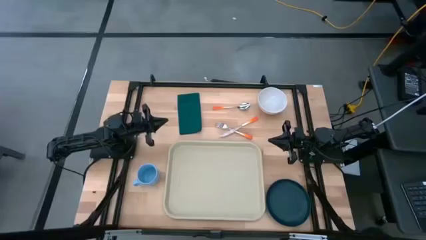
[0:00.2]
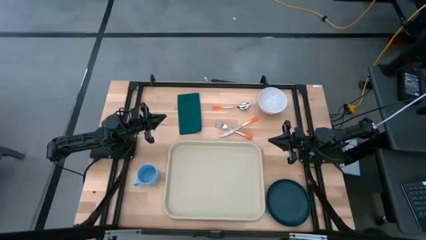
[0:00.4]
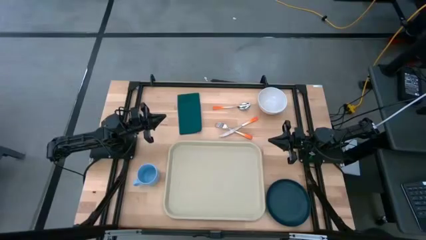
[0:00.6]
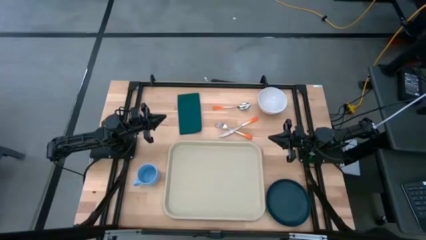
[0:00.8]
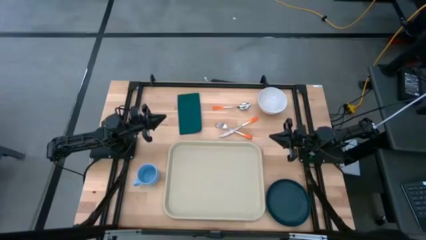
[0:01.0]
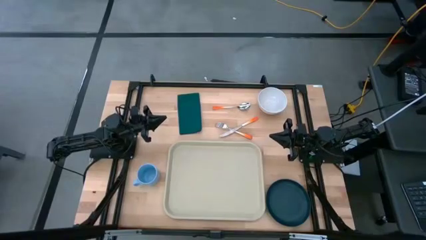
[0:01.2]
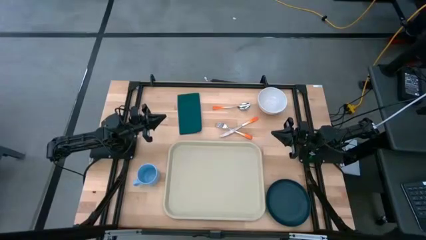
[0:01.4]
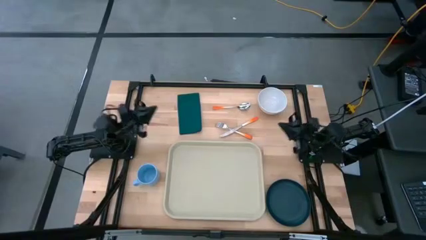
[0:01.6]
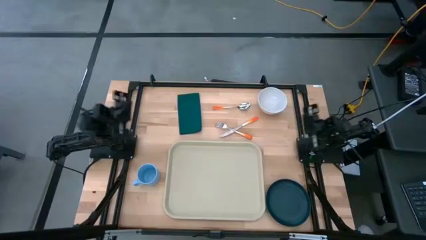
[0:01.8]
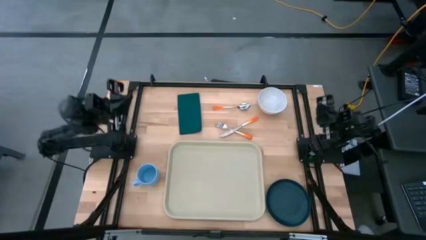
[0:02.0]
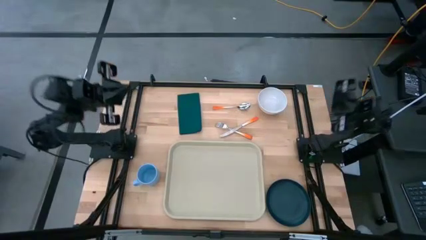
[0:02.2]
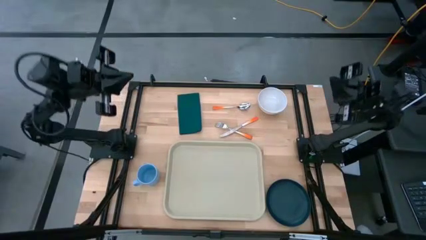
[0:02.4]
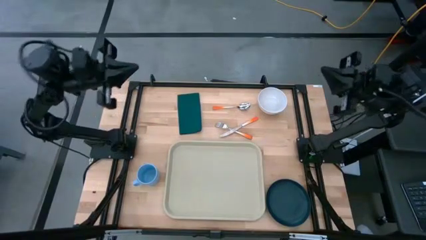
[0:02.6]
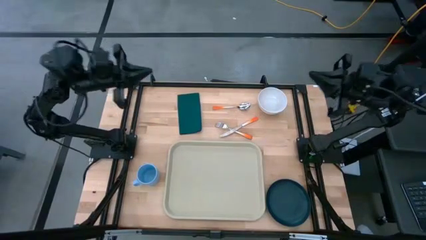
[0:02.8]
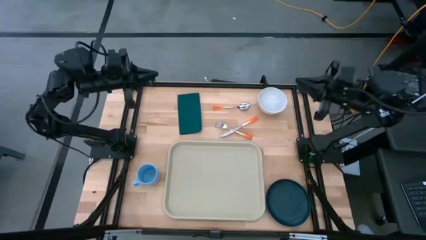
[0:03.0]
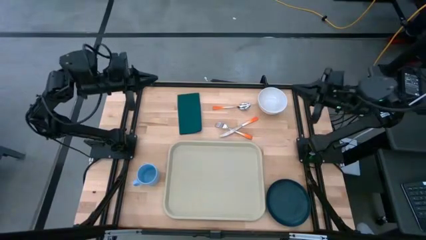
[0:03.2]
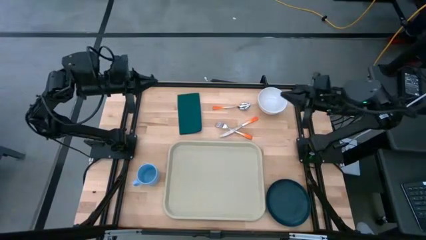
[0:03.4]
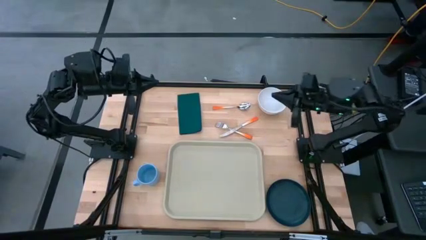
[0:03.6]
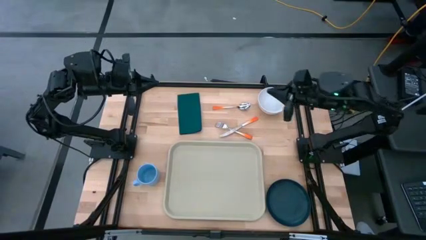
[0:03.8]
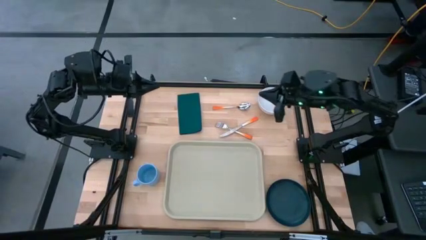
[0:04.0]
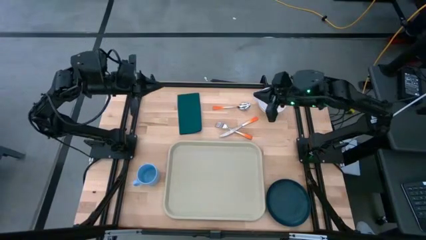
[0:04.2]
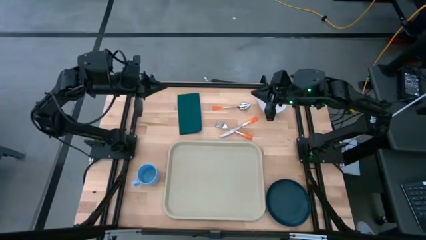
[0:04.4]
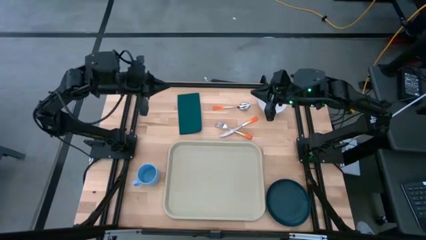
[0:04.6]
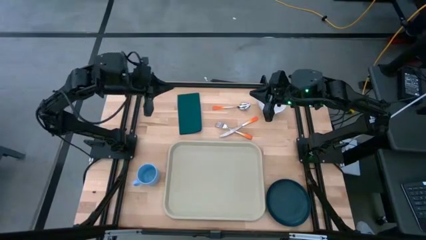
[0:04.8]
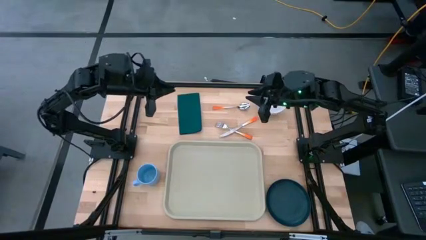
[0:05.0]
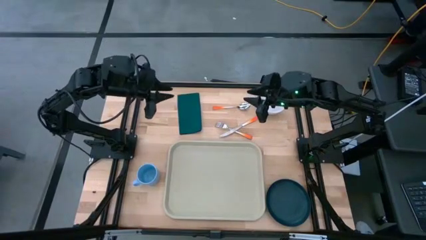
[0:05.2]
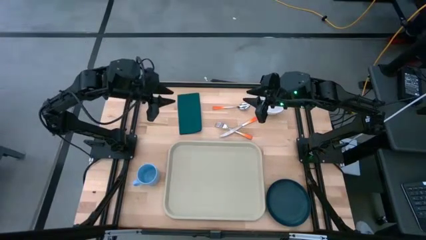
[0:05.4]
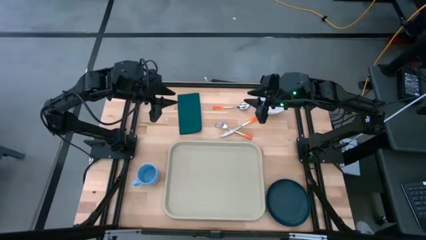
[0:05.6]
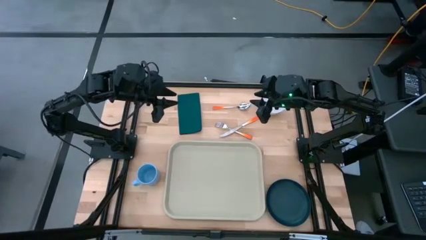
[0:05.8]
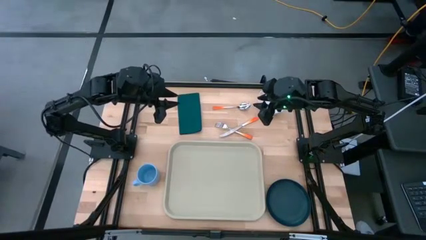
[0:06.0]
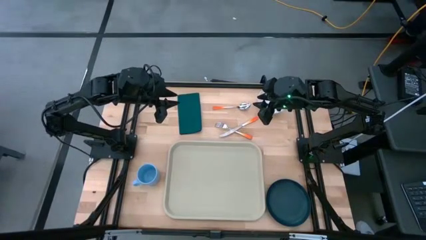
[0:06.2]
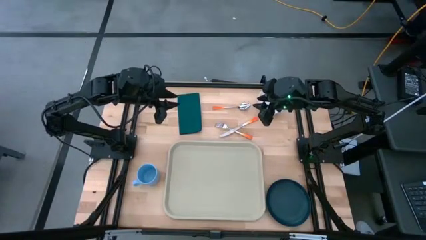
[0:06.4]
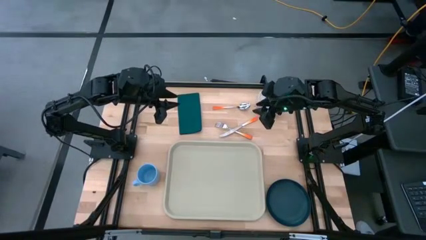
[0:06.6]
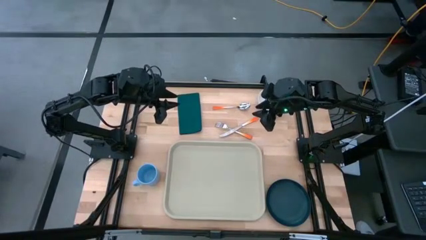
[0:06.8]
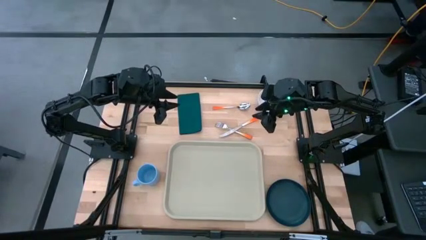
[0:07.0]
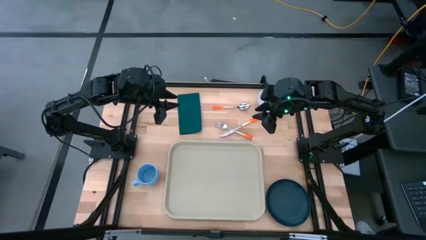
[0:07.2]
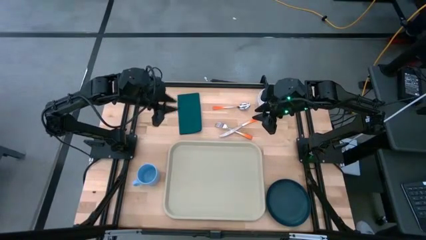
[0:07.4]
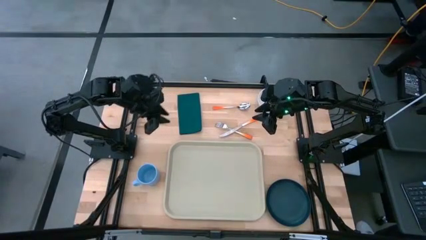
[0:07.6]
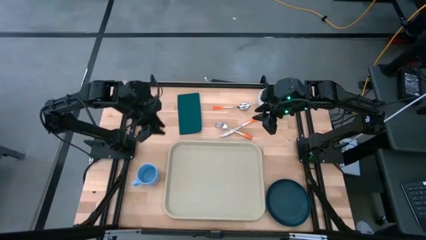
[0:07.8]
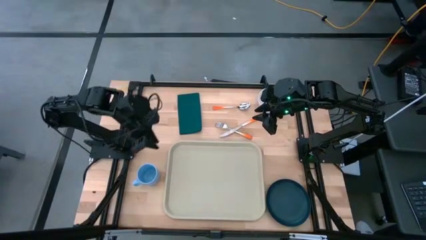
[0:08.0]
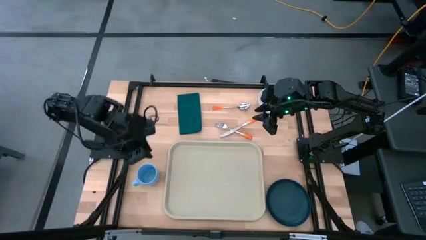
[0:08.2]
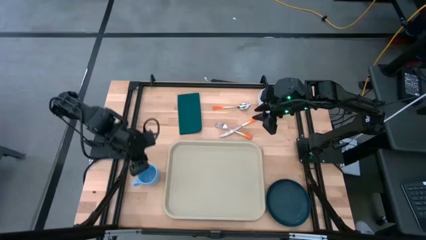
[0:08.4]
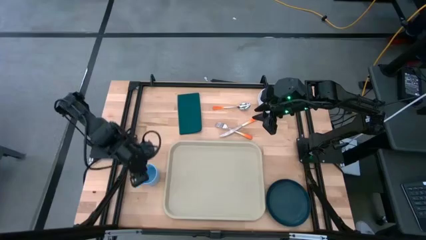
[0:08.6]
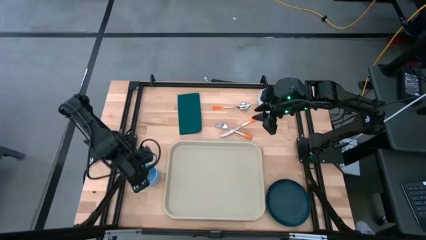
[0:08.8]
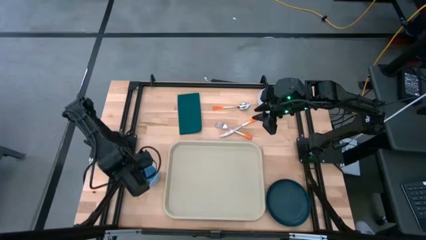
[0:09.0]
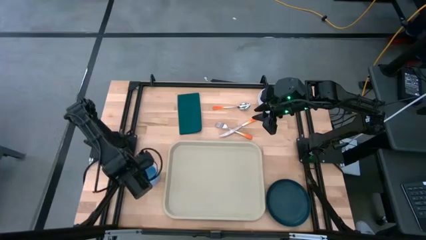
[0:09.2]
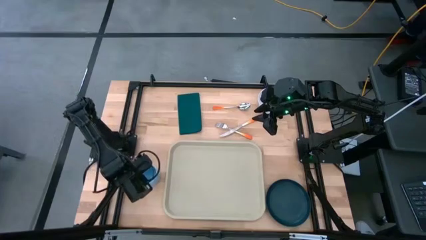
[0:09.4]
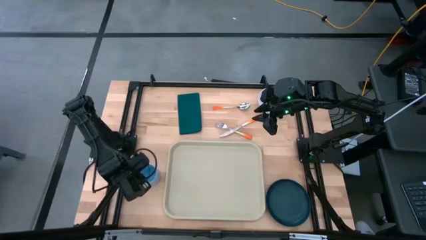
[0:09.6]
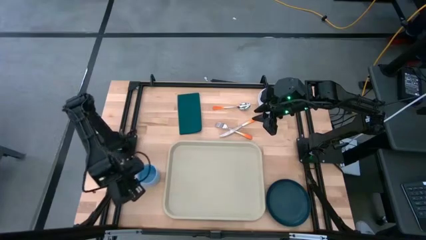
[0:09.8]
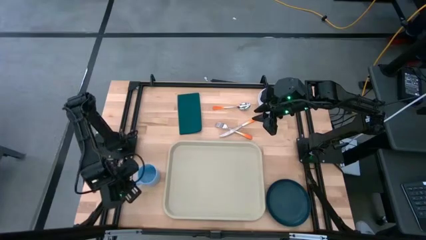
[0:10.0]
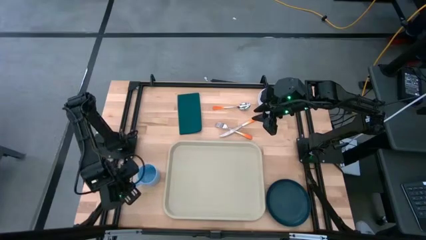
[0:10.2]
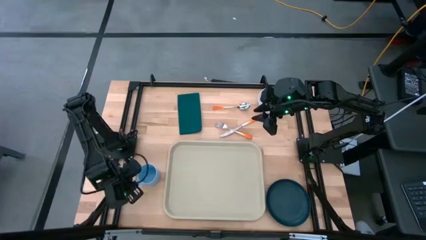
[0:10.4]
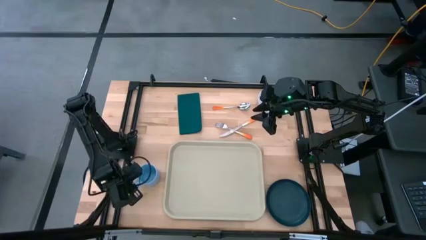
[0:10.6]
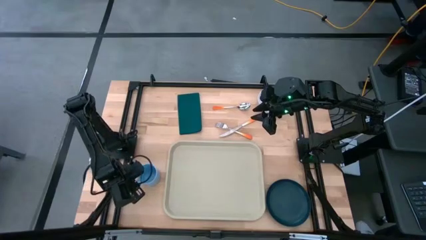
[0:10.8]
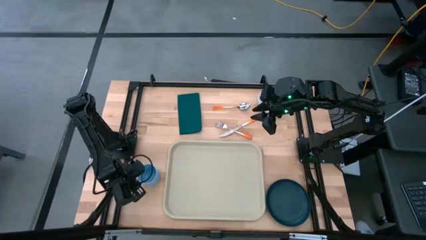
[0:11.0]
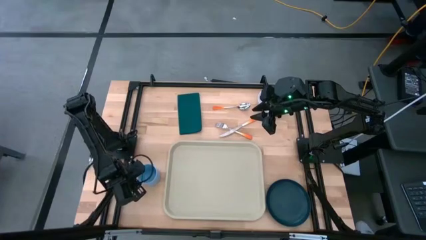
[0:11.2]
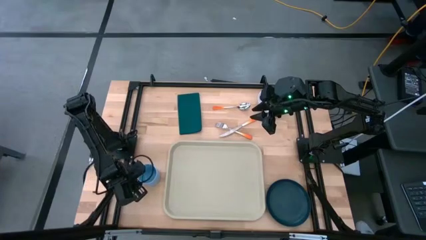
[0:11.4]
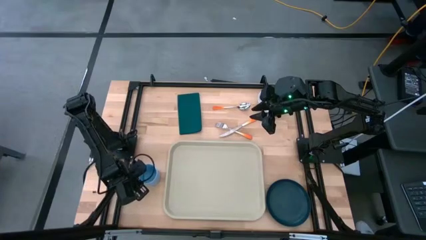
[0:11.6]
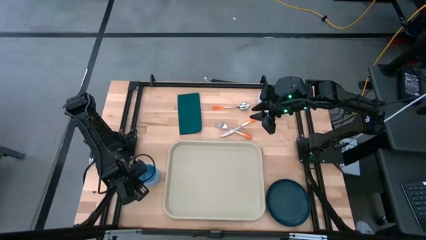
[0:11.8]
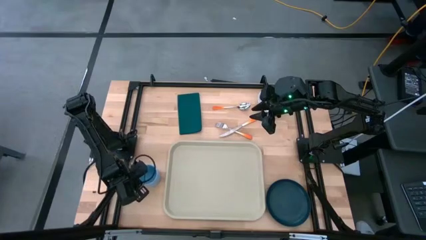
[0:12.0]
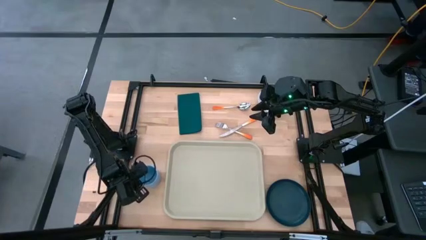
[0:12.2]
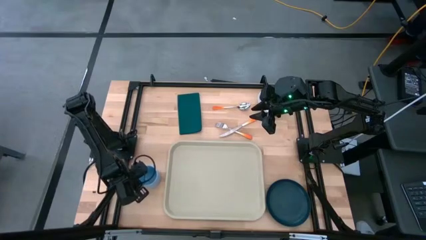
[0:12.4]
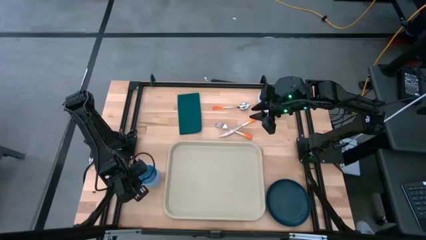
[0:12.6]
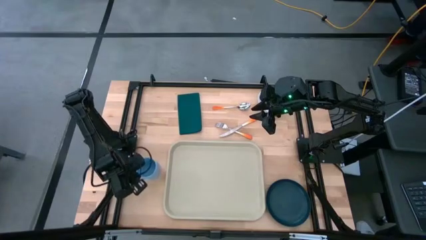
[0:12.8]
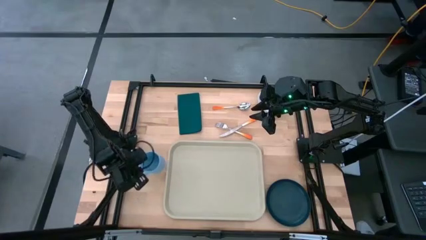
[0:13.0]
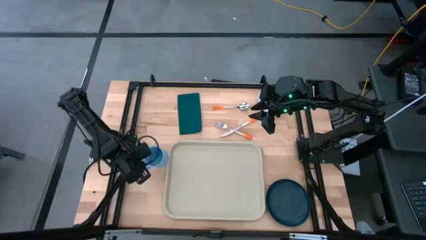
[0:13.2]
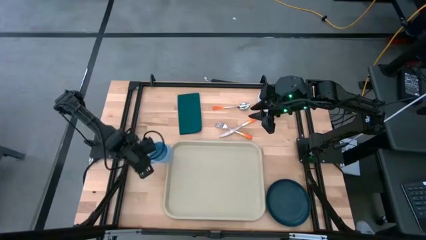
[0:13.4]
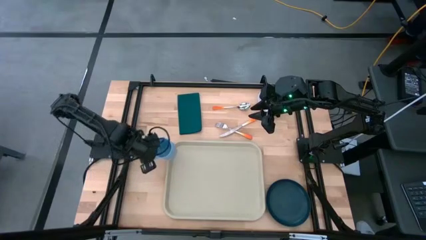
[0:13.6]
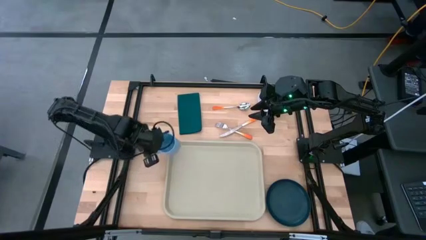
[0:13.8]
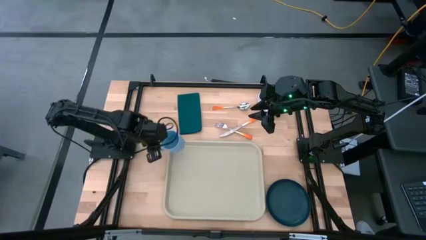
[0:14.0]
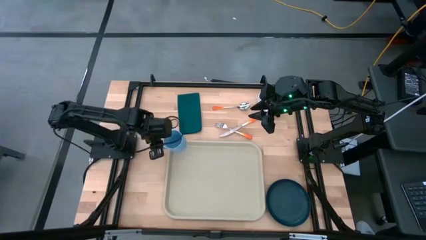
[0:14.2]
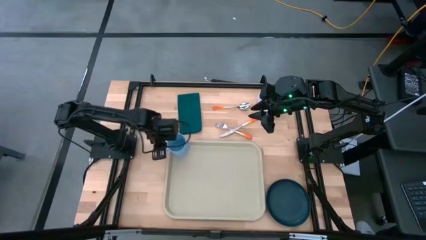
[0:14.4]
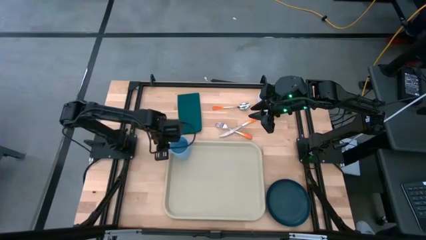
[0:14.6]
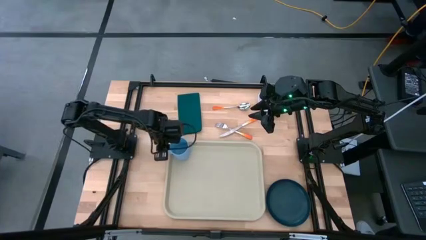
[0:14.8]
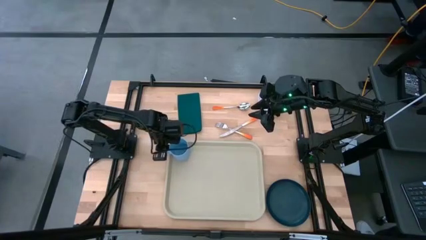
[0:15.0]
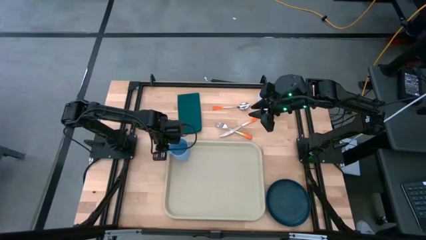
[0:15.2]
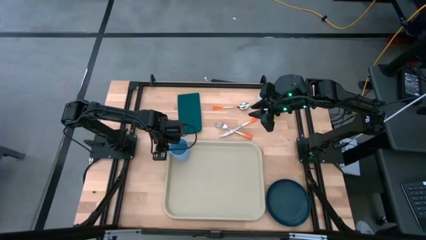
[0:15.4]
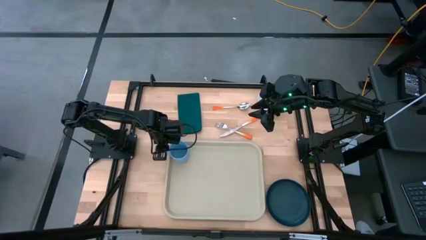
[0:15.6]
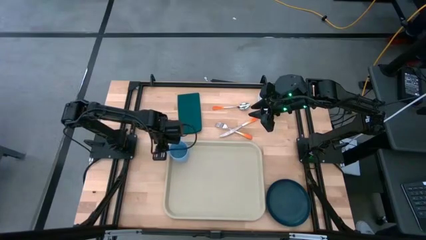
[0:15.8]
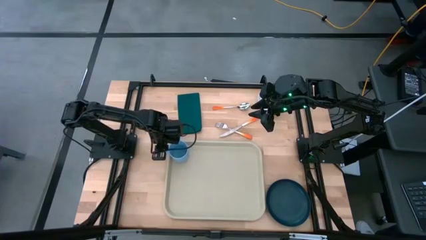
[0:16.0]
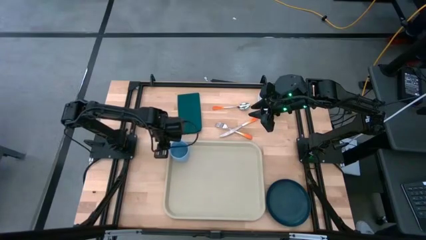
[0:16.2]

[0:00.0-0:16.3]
Task: Set up tray
Put the blue mug on the gray tray
